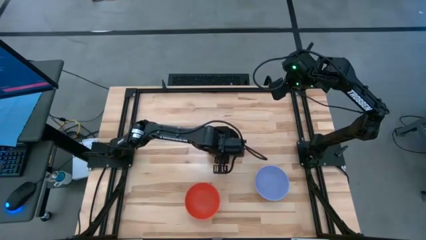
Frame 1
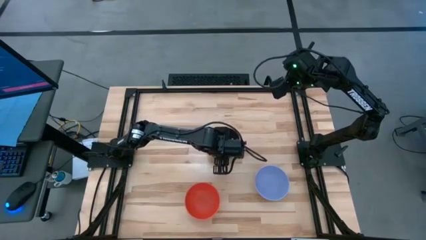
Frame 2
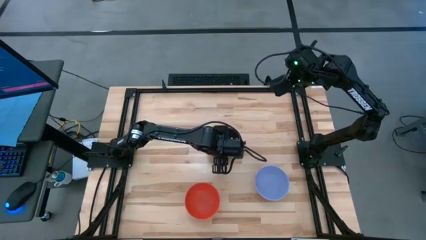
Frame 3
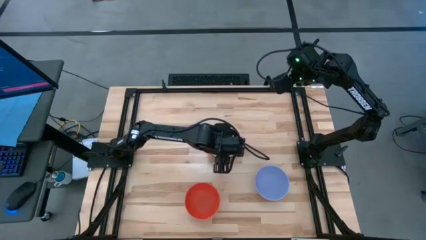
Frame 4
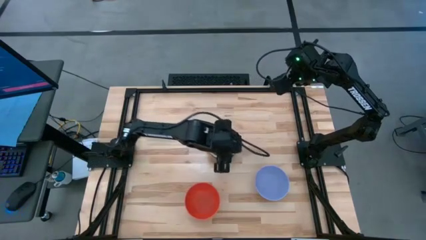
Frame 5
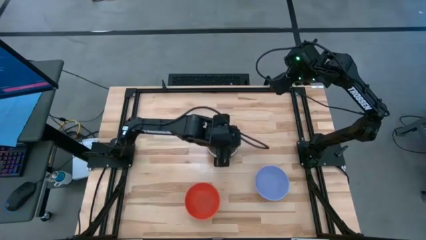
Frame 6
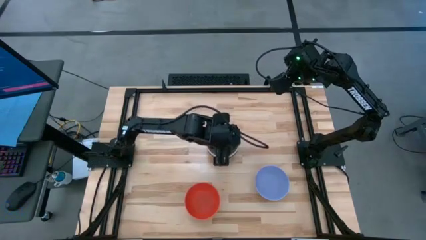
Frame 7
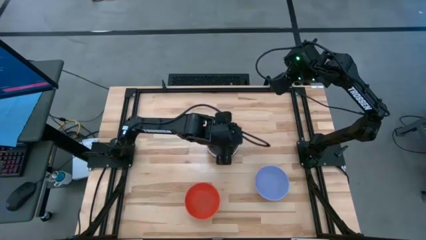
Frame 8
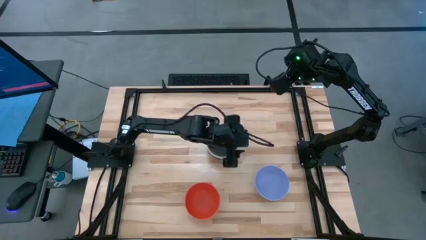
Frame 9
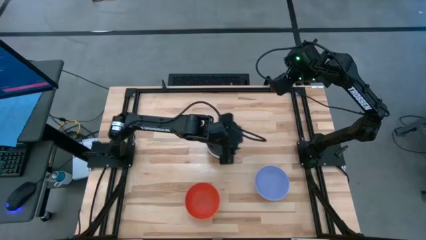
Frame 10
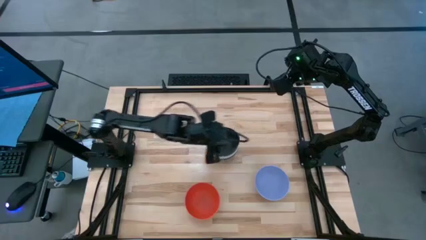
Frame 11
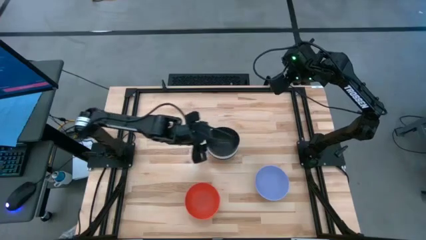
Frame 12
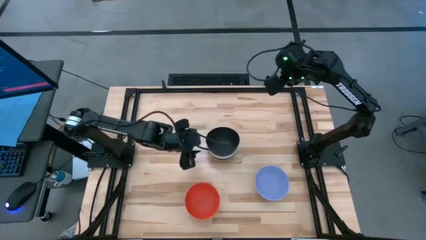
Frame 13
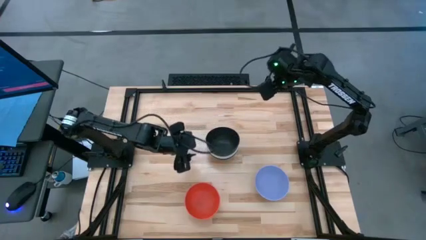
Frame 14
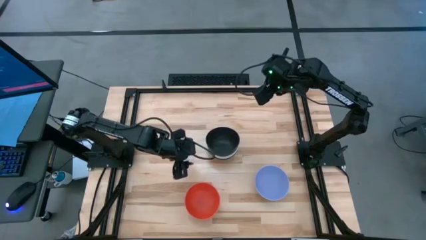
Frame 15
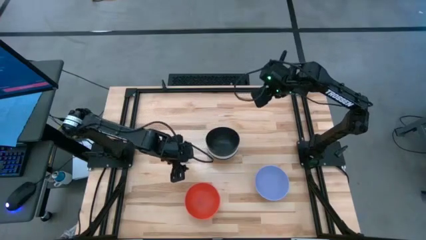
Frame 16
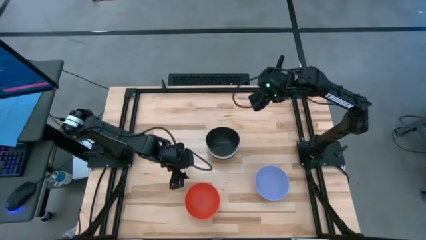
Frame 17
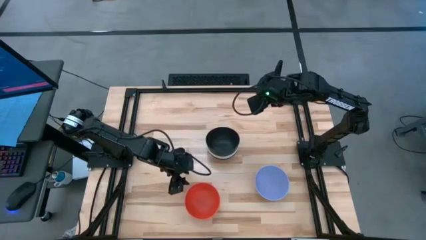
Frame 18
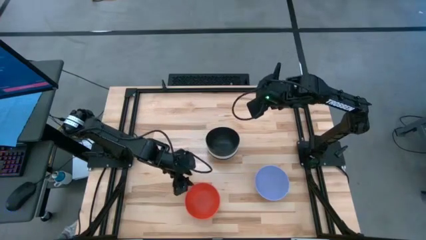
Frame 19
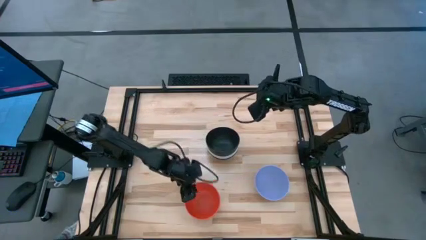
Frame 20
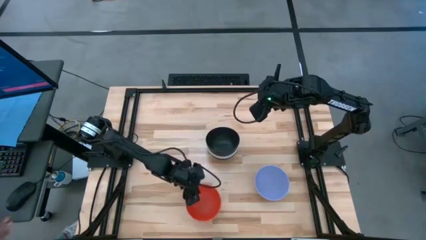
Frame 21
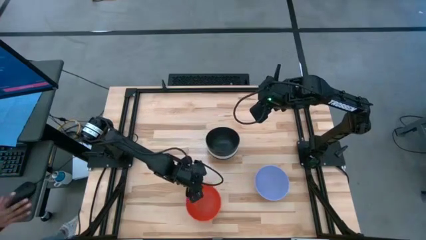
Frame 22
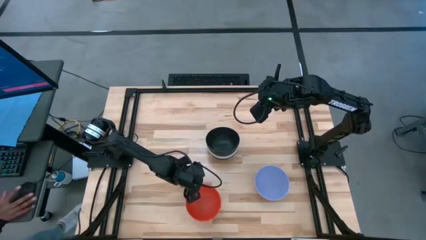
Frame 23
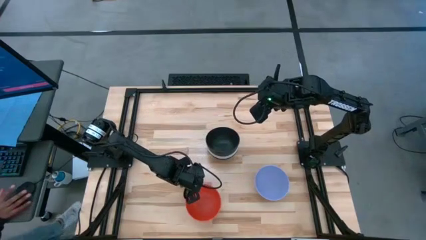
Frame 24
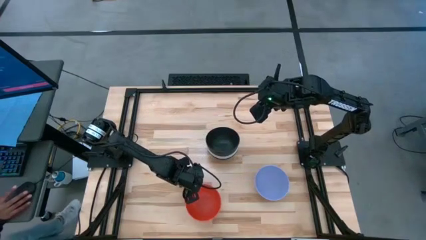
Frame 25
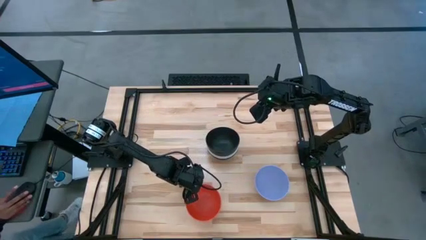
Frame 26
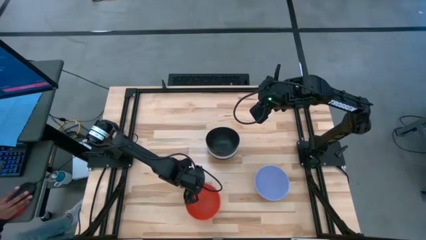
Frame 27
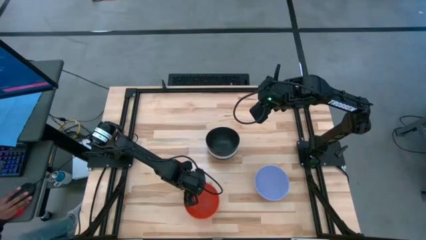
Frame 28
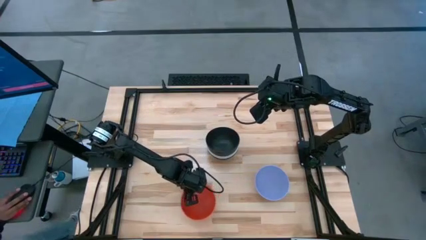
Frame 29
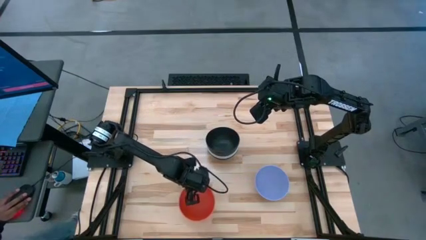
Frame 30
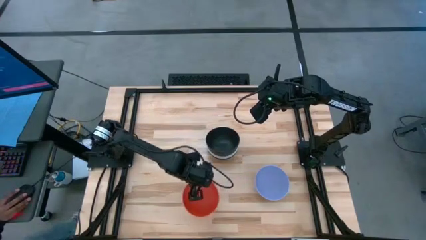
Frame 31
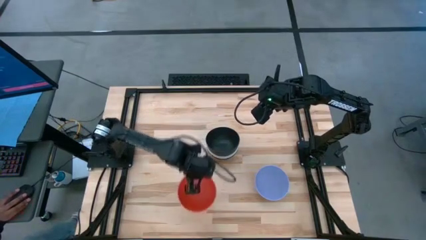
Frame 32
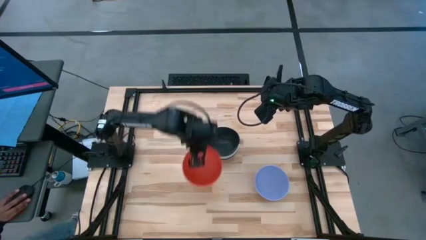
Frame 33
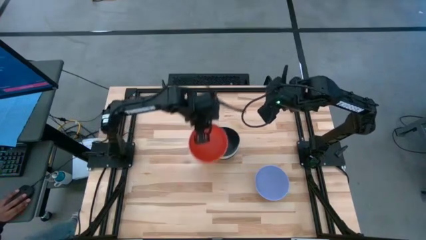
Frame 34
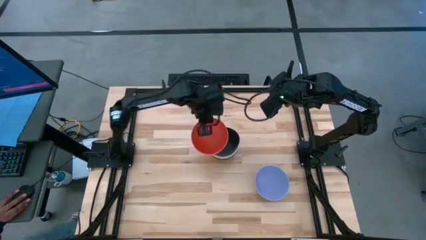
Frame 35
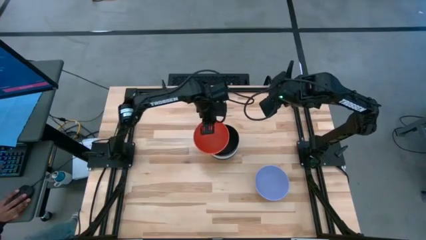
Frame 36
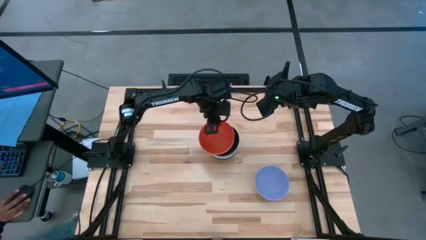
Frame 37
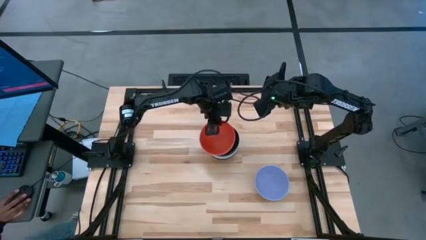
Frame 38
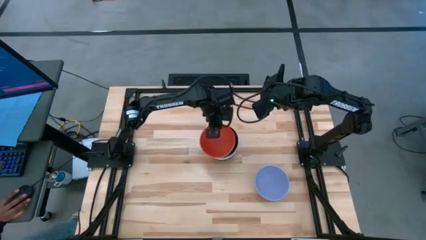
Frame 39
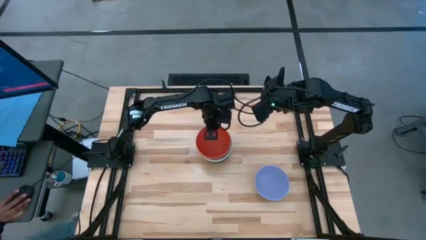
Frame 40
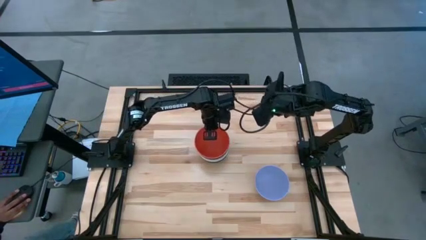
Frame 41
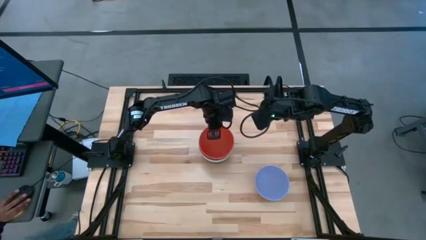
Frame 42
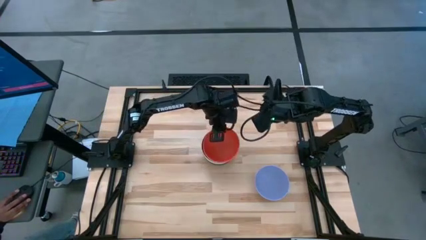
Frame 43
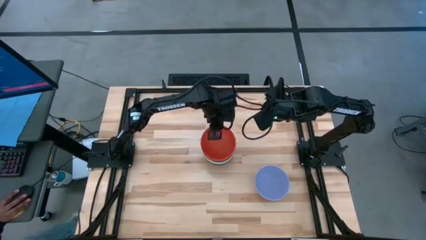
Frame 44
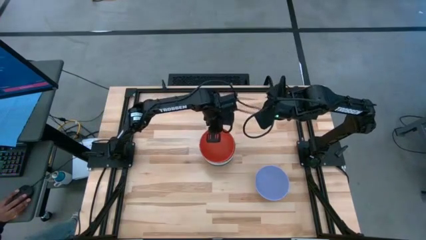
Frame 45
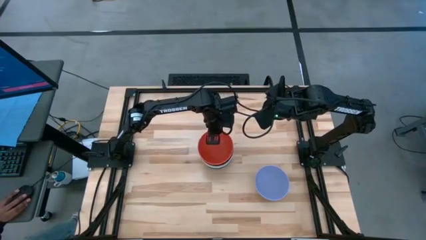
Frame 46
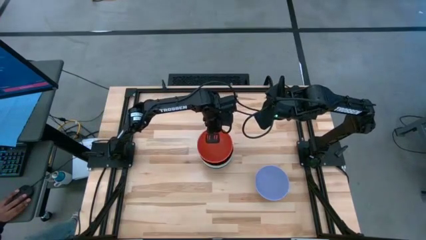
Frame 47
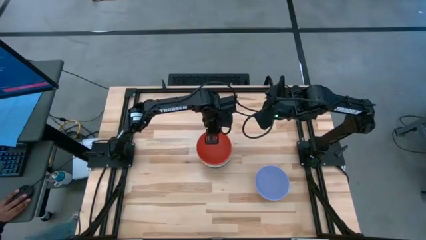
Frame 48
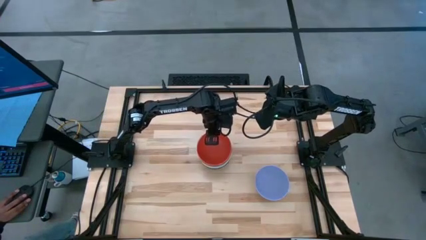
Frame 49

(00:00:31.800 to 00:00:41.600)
Task: Nest bowls inside each other
Stack the orange bowl on top of the black bowl

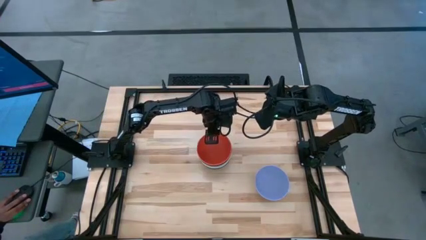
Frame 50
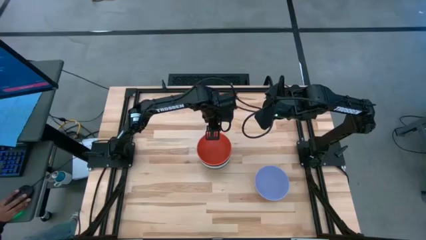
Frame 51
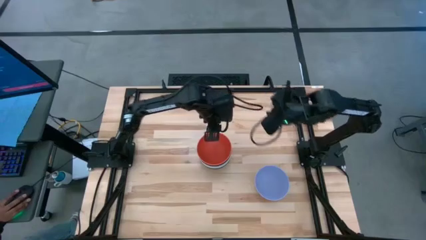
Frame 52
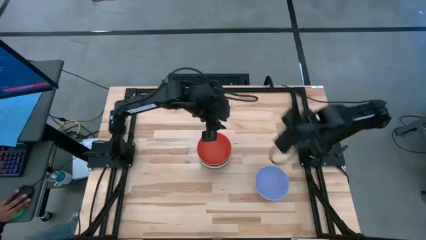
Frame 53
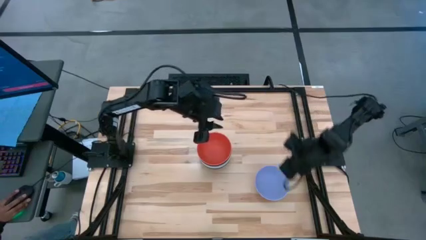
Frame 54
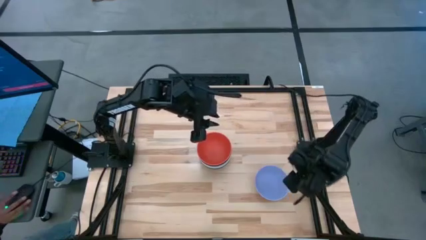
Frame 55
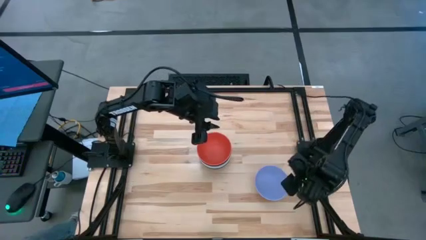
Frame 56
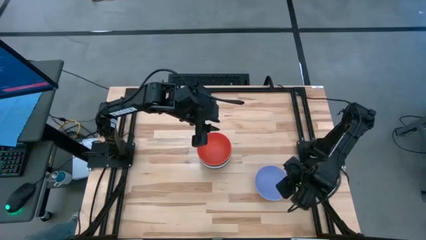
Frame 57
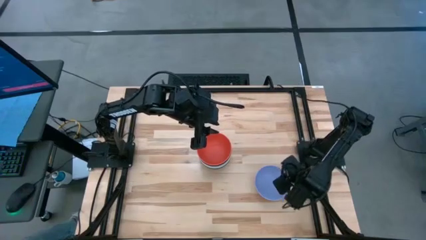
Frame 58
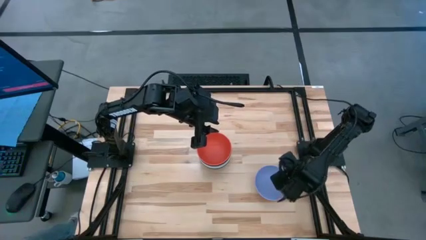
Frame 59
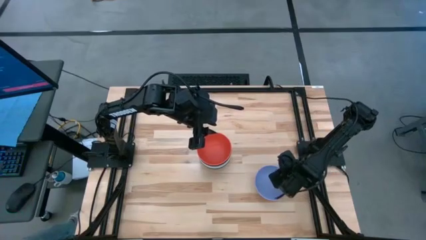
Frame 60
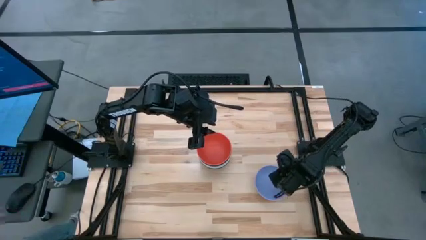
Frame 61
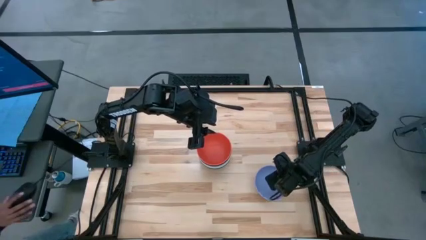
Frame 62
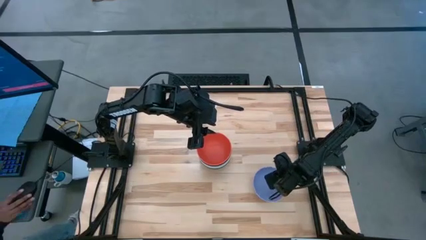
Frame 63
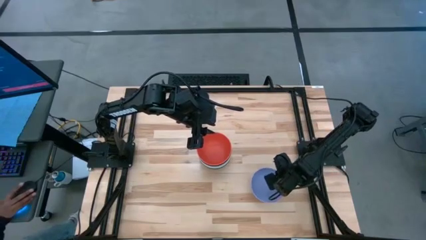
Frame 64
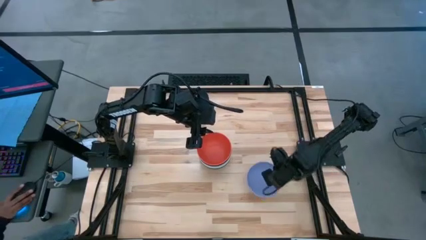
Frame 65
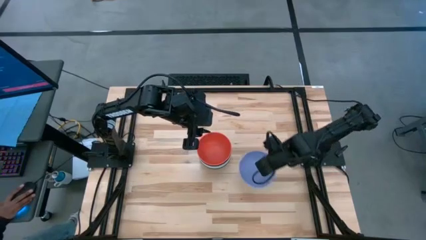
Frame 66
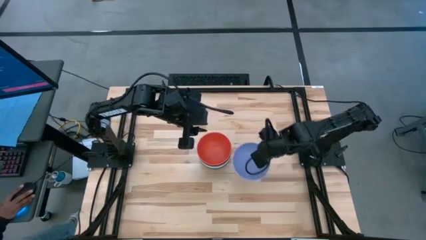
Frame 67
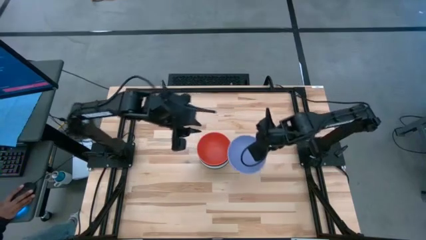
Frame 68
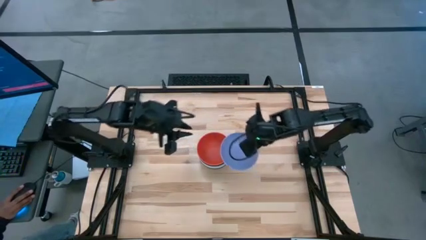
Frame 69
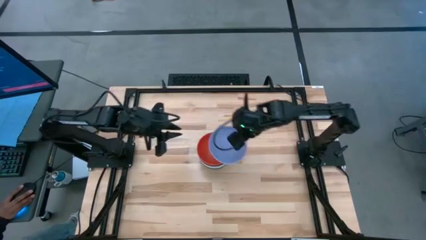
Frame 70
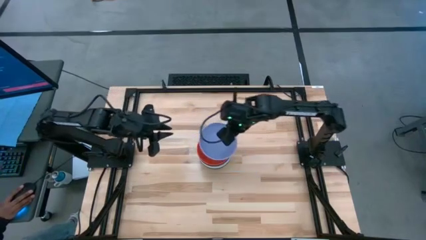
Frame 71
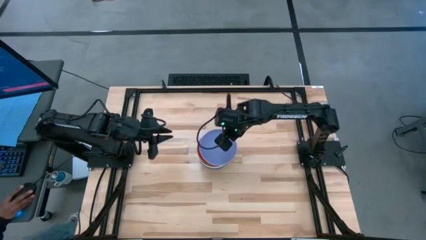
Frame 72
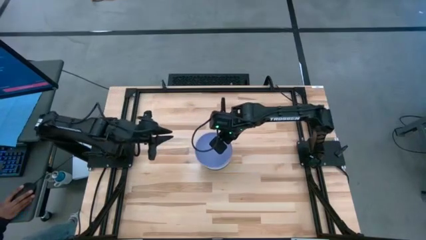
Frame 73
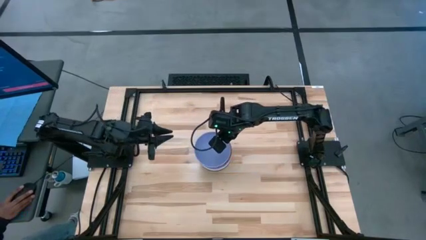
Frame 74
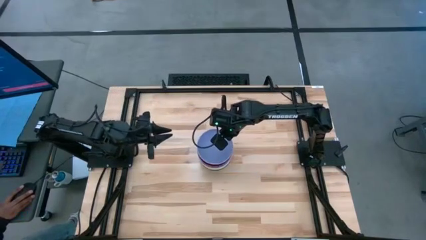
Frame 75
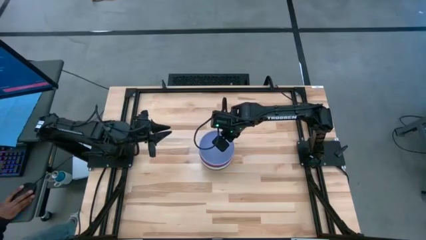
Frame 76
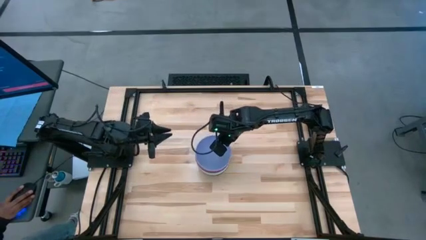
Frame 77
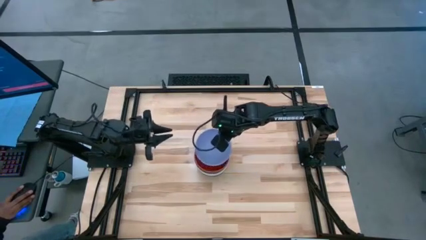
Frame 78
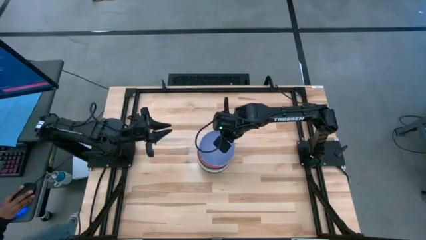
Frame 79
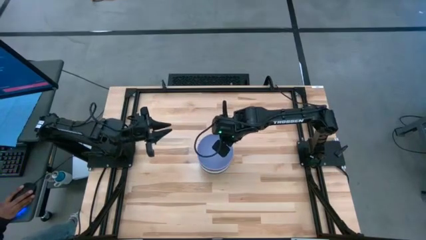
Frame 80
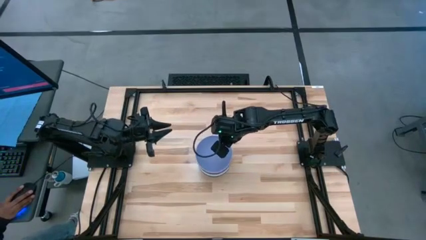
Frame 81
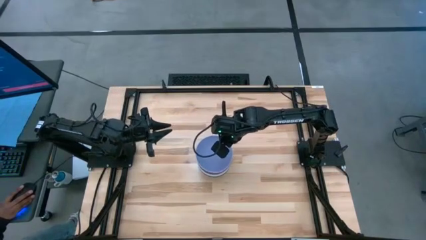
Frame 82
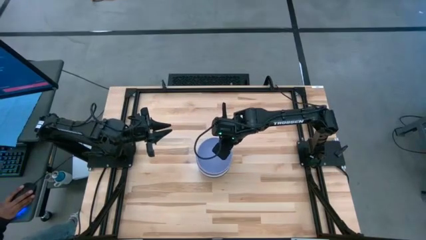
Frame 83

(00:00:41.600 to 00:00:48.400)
Stack the violet bowl on top of the orange bowl

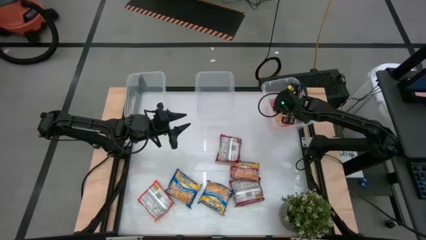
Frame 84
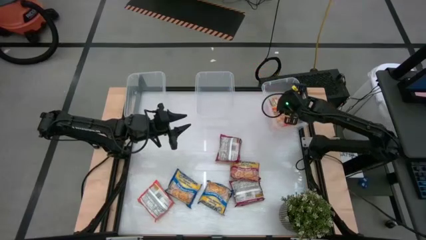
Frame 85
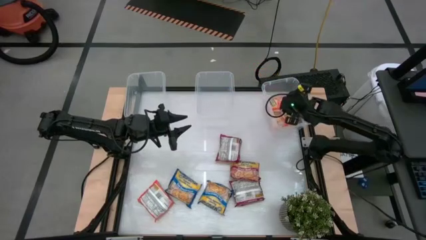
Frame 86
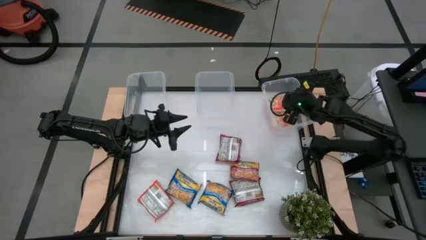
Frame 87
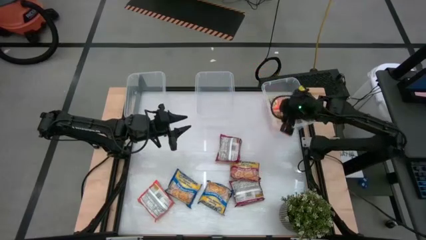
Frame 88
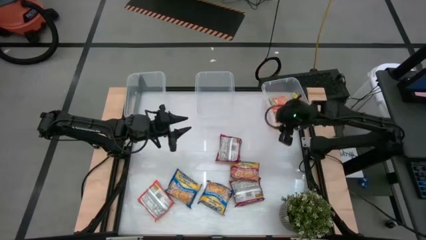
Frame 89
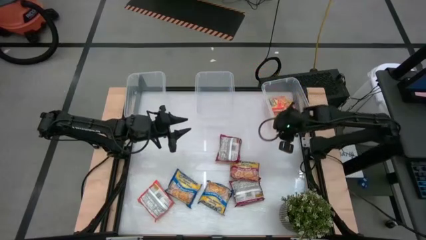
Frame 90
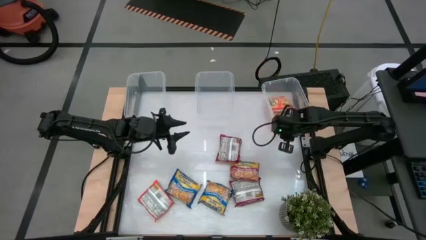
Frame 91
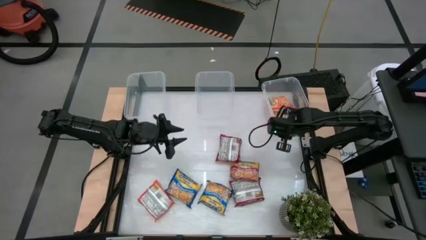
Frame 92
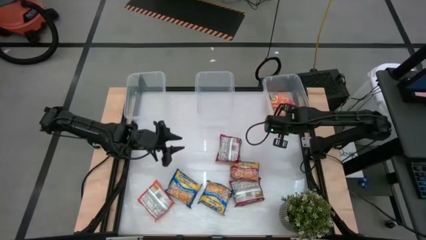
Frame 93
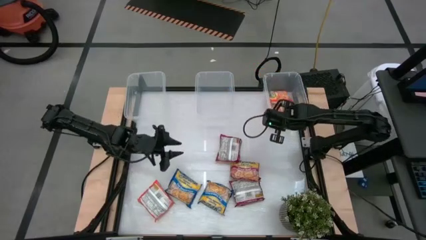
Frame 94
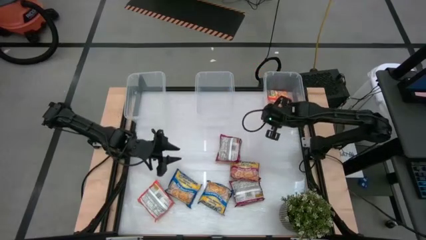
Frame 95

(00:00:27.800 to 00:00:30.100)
Task: Sort Maruchan noodles
Adjust the right transparent bin
